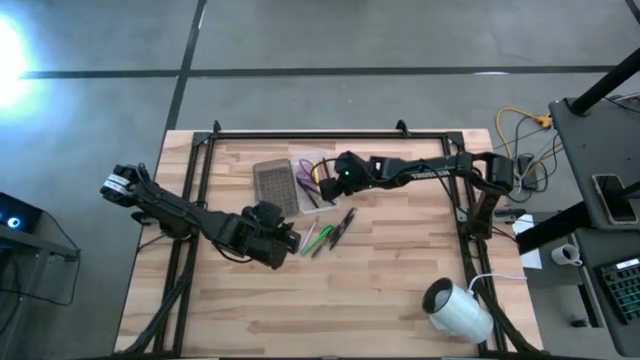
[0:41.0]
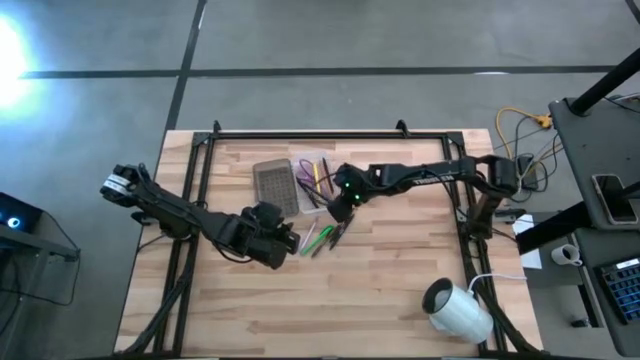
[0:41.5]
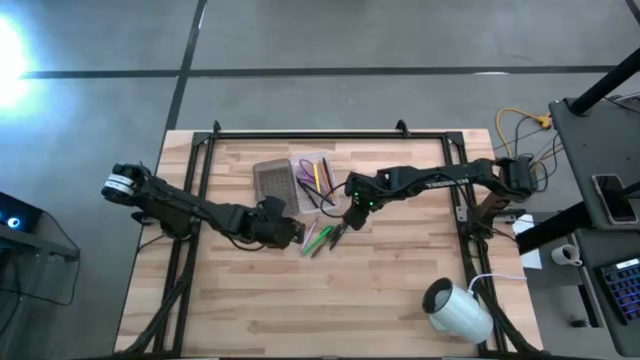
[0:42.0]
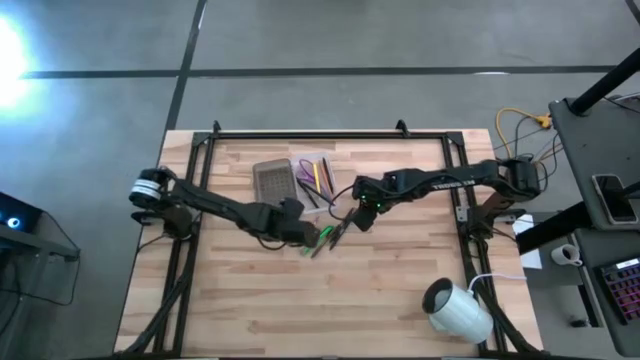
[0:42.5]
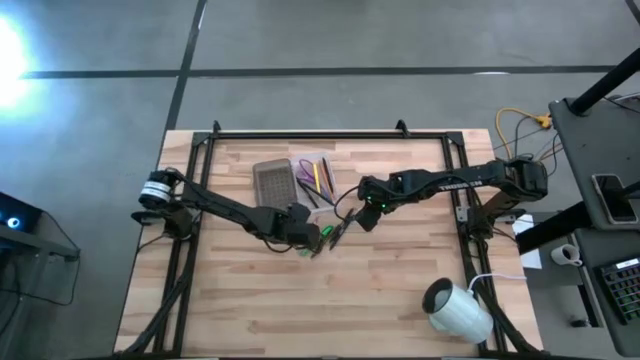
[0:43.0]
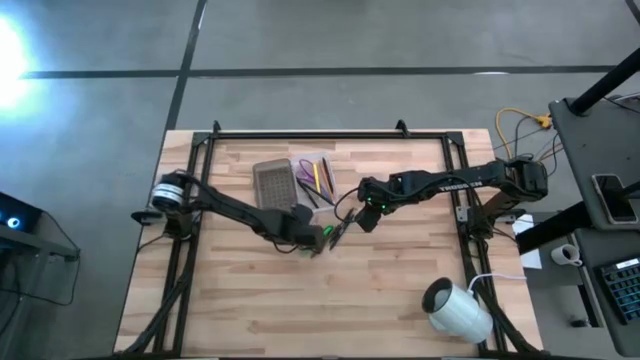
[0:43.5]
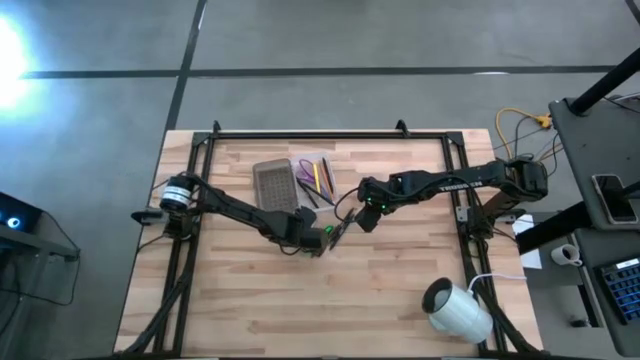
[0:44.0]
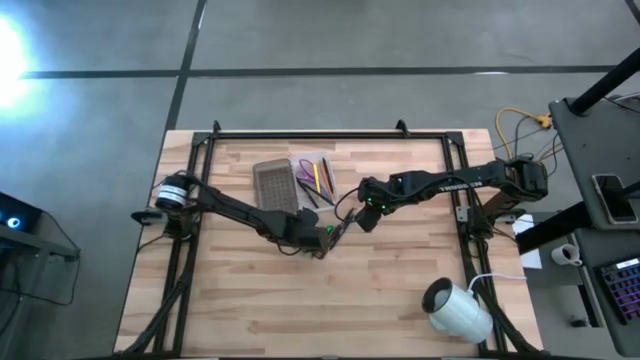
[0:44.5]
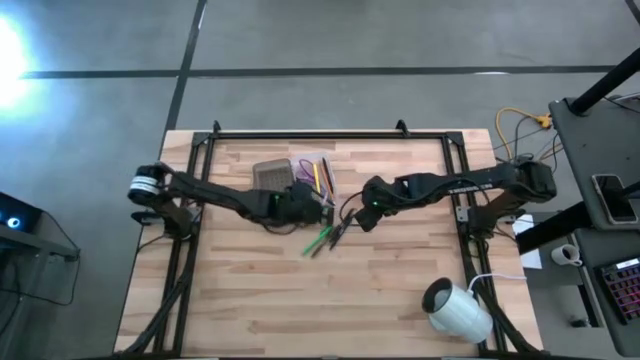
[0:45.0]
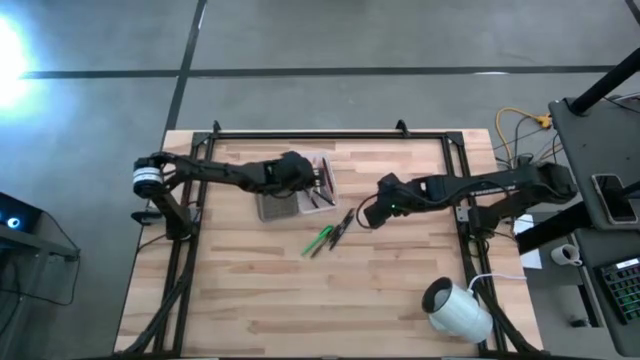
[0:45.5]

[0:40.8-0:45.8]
Task: Pick & place school supplies into a supply box
Put the violet pen into the supply box

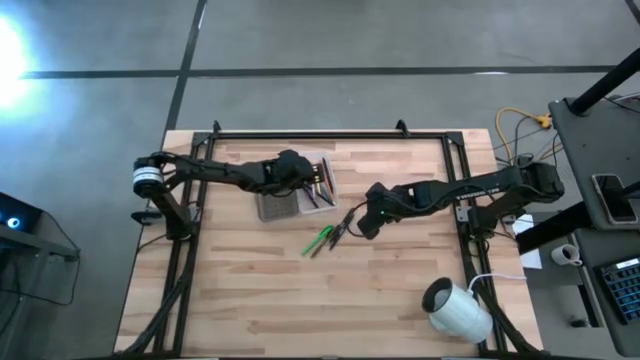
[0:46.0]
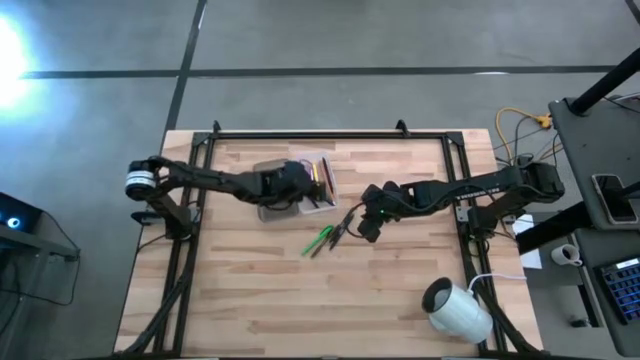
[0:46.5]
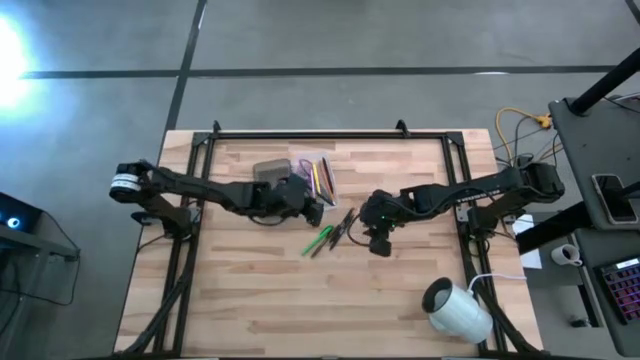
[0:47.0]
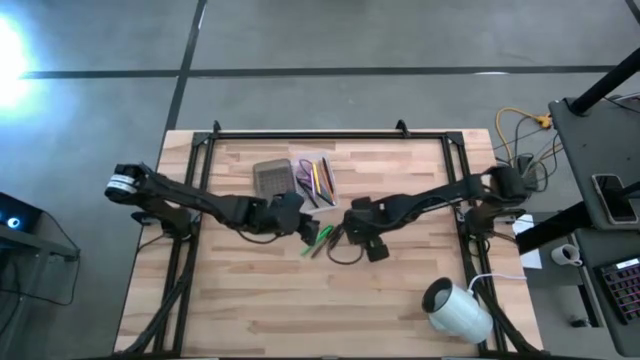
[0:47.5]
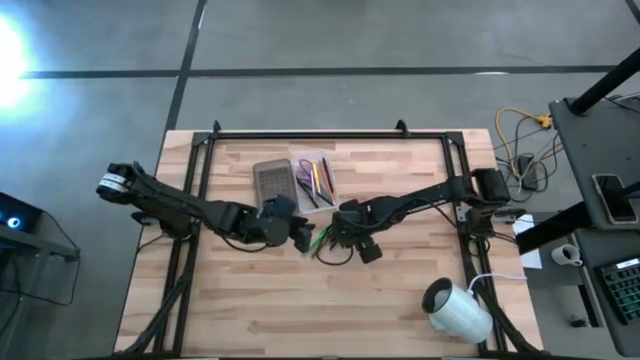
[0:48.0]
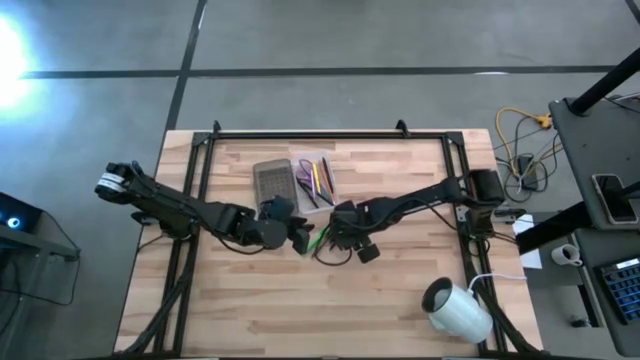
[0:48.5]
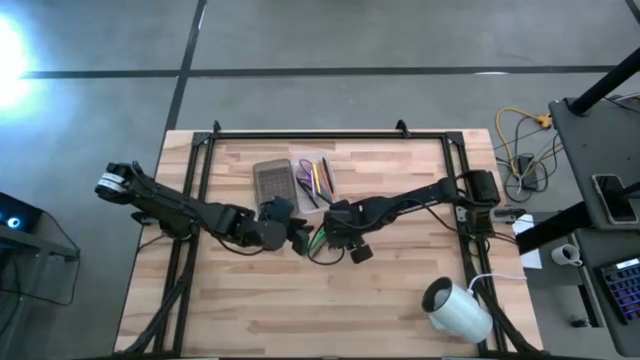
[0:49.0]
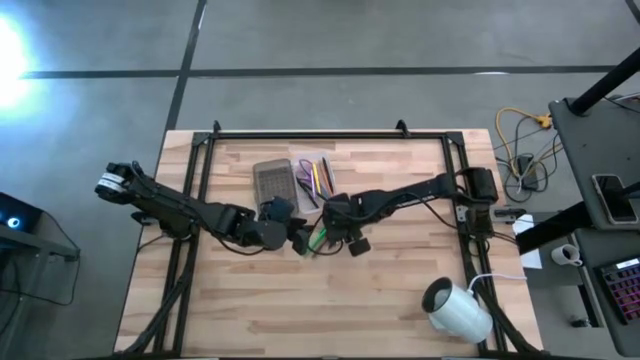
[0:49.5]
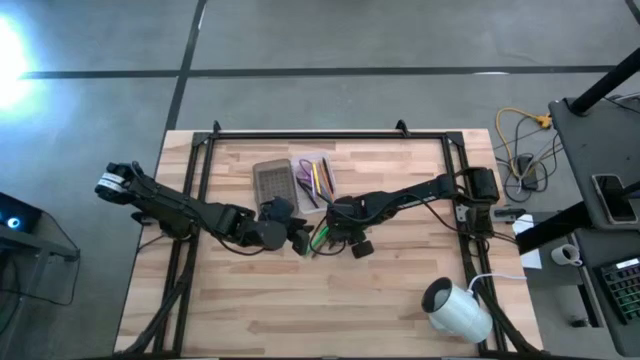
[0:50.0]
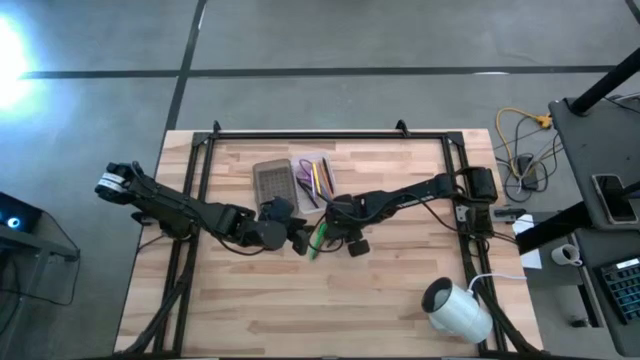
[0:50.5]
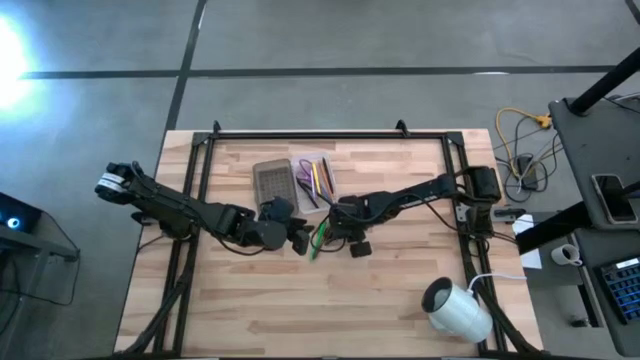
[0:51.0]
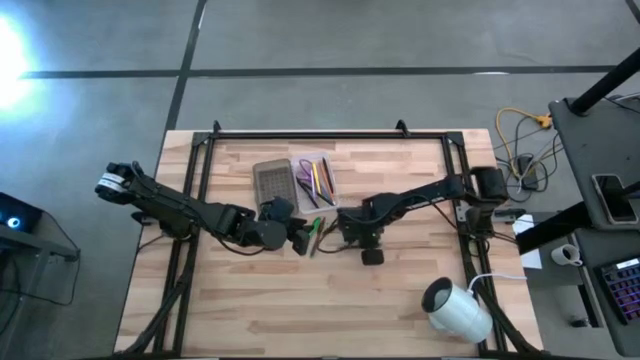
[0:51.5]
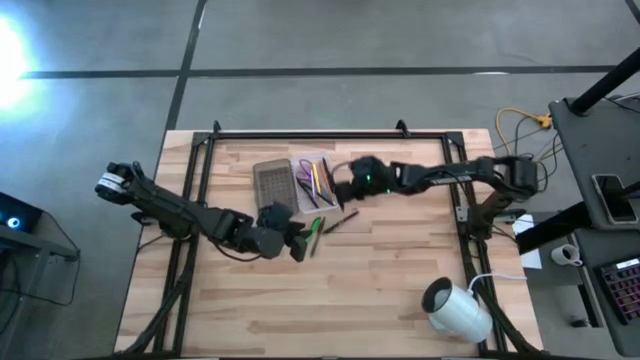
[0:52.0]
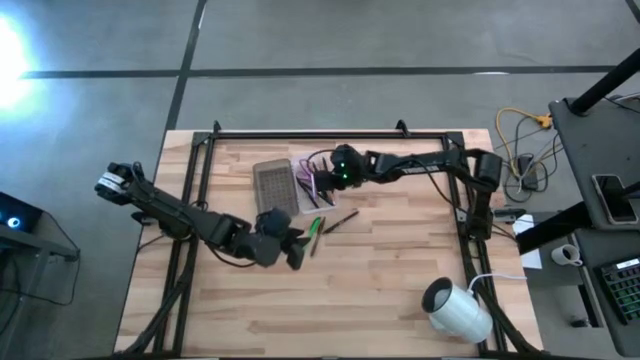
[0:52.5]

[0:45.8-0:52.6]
Put the black pen into the supply box

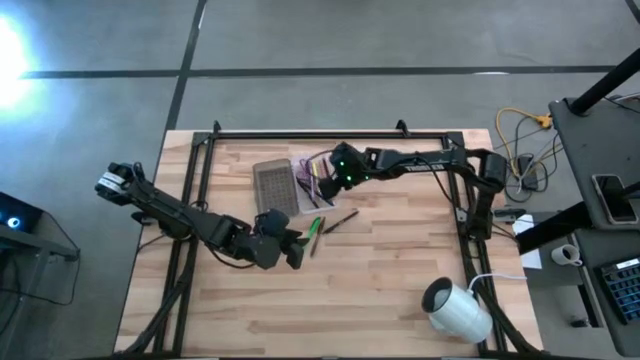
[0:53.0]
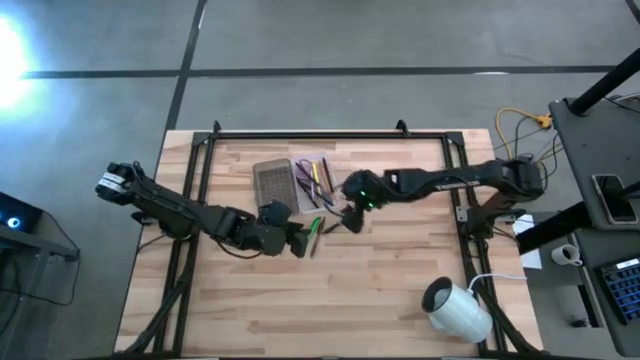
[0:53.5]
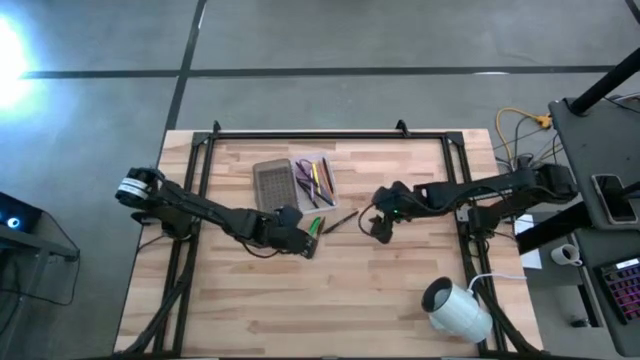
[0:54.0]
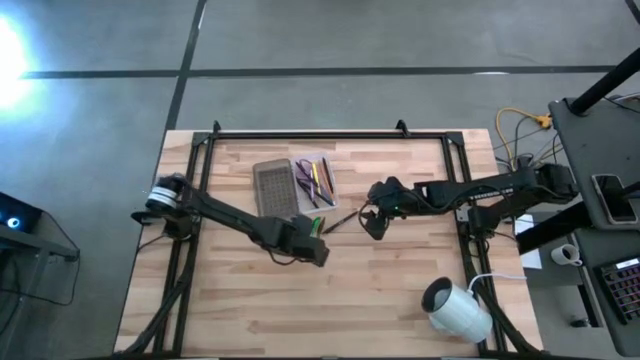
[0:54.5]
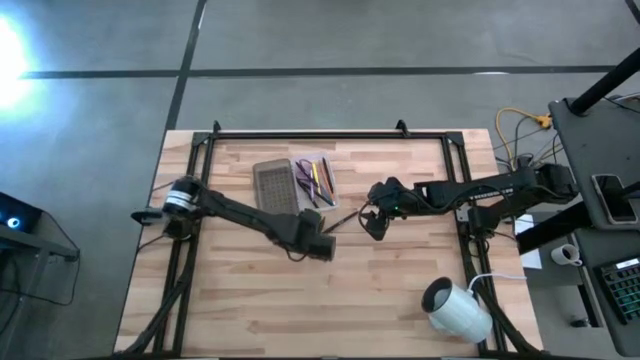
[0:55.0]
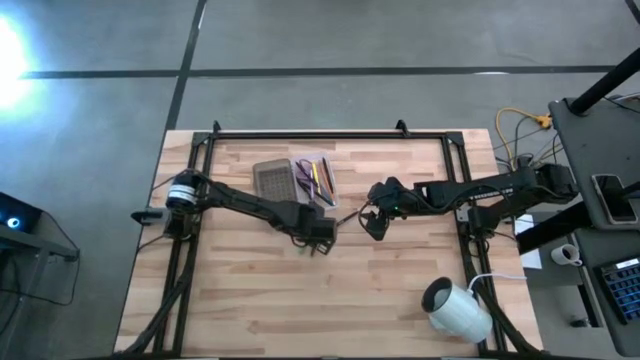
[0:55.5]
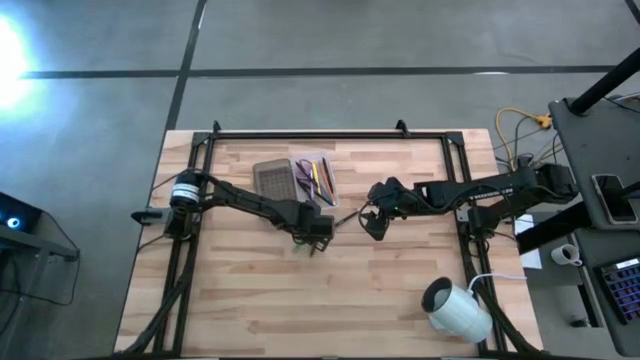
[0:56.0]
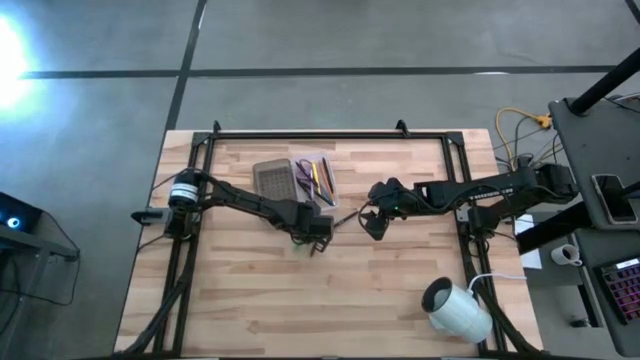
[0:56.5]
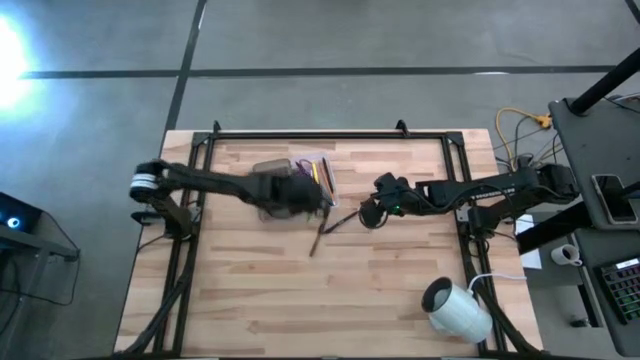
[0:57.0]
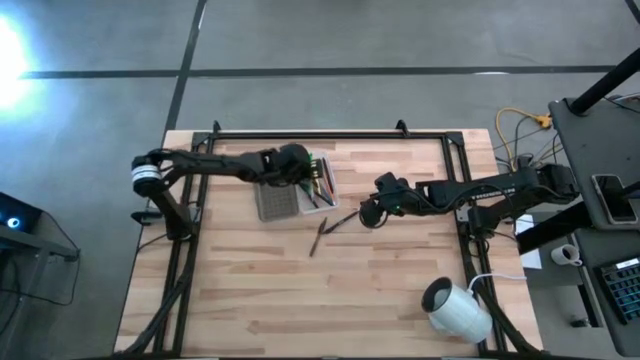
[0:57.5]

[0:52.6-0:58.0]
Put the green pen into the supply box

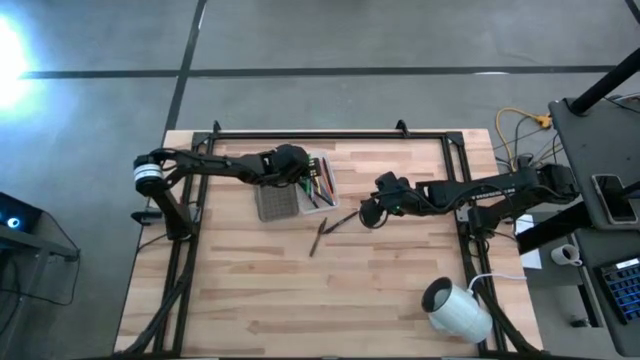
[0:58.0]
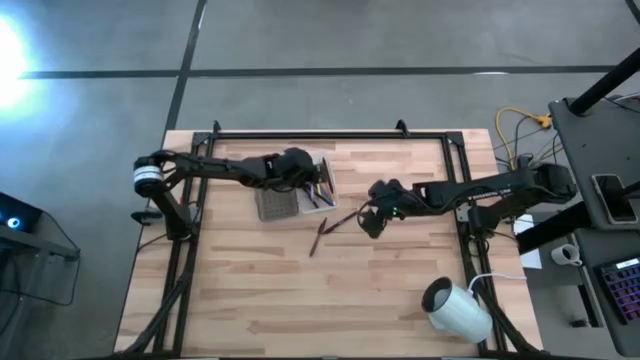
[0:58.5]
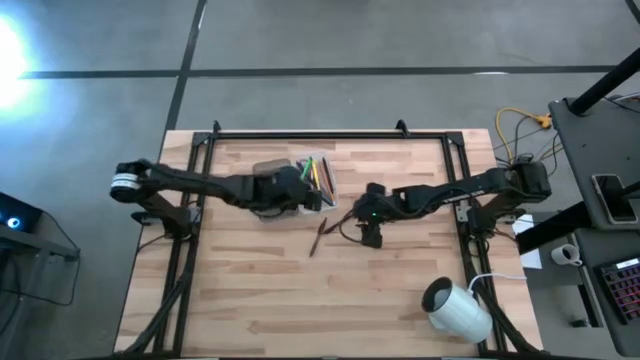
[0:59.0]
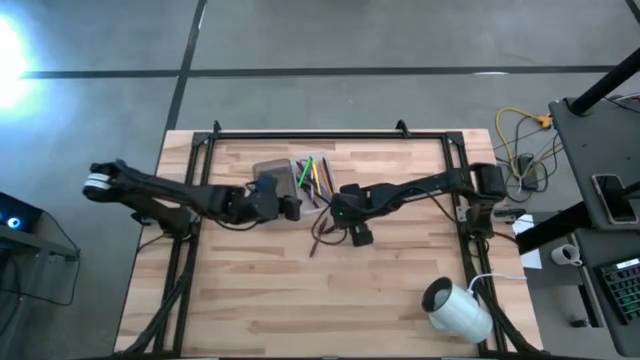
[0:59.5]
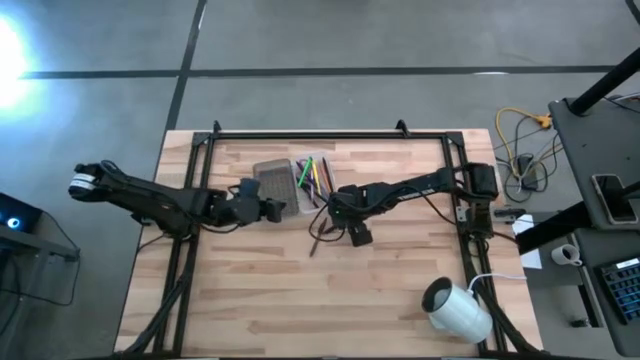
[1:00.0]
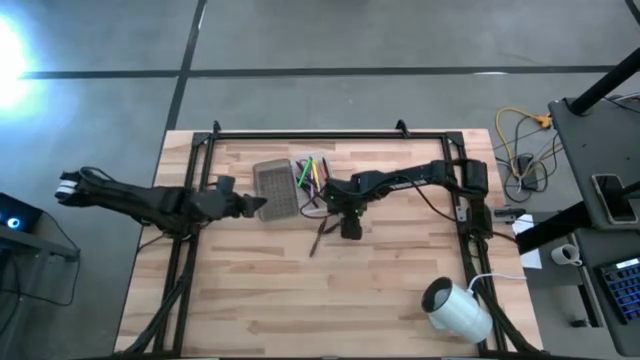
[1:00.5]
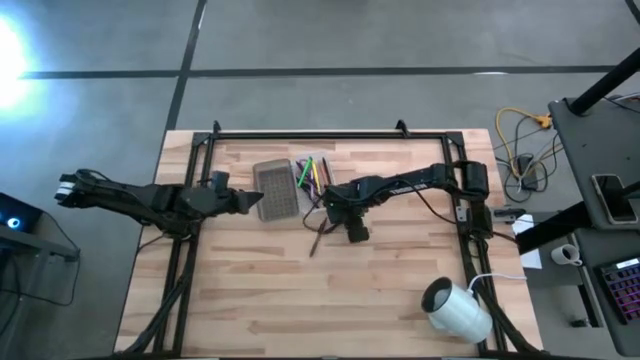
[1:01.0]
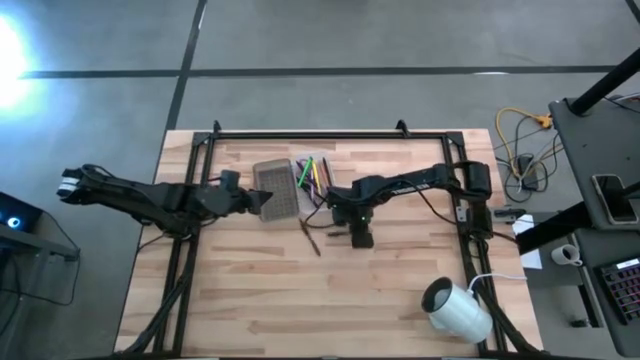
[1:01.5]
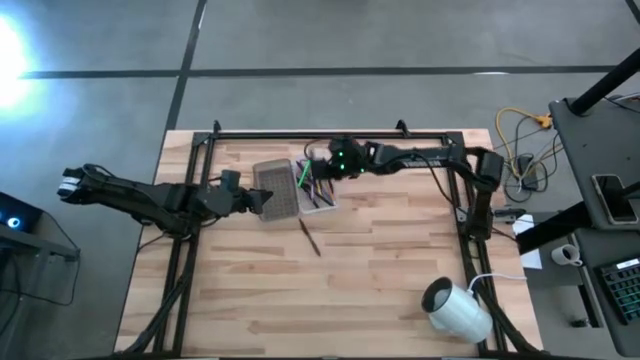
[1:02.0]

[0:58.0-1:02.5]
Put the black pen into the supply box

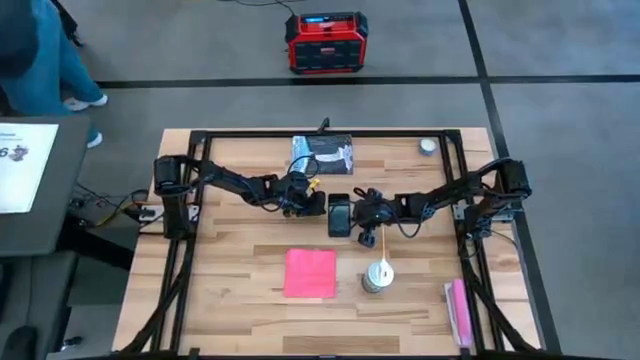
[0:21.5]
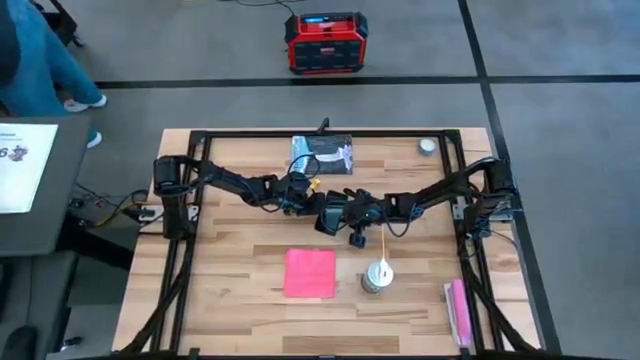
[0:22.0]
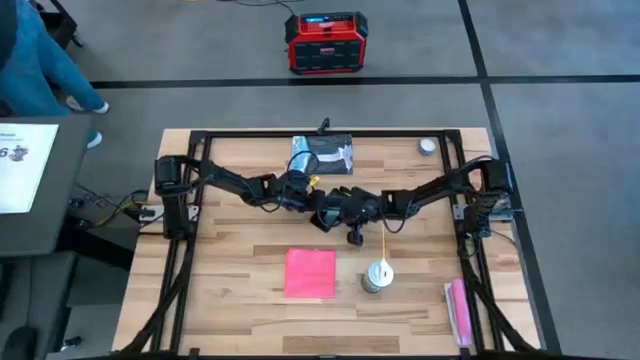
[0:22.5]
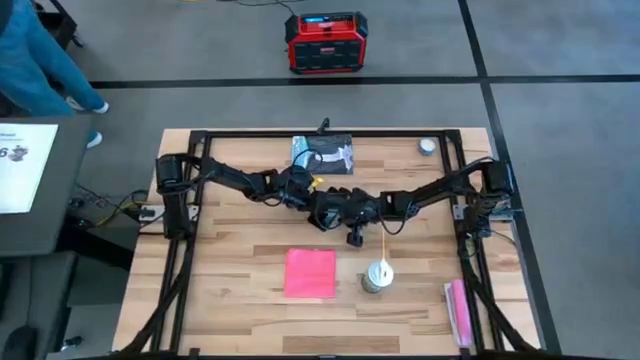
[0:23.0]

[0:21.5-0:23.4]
Task: Apply microfiber cloth
Spray the front of the cellphone using the spray bottle
